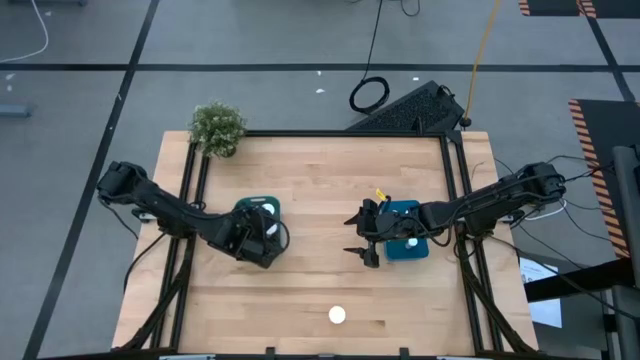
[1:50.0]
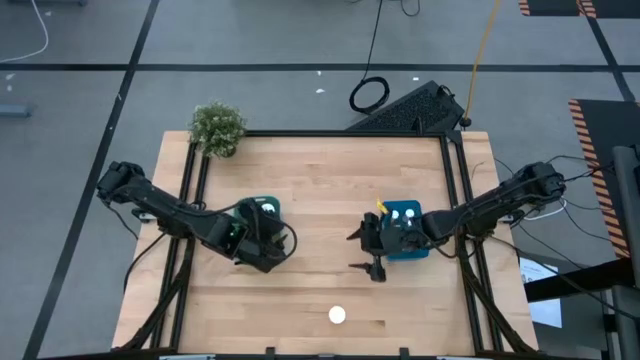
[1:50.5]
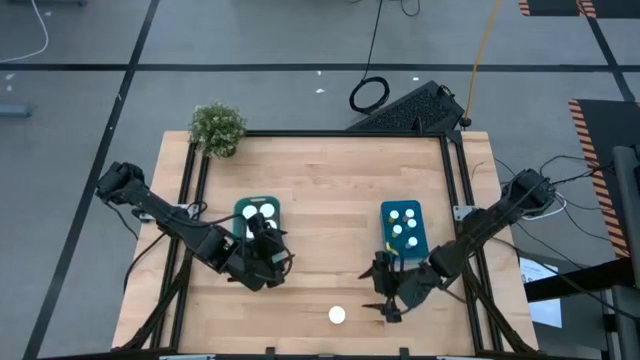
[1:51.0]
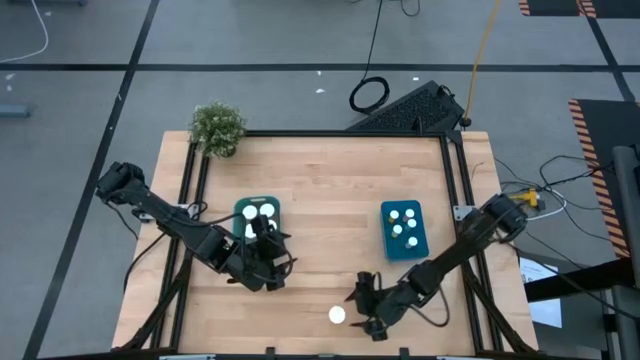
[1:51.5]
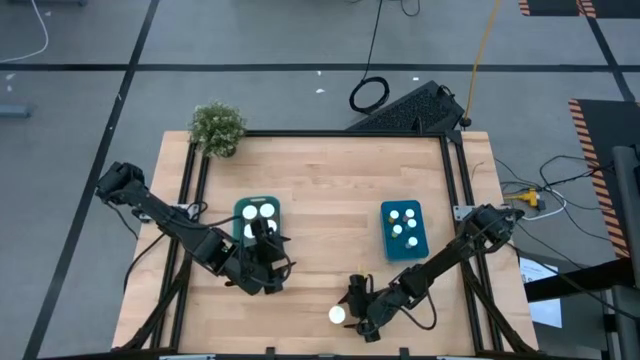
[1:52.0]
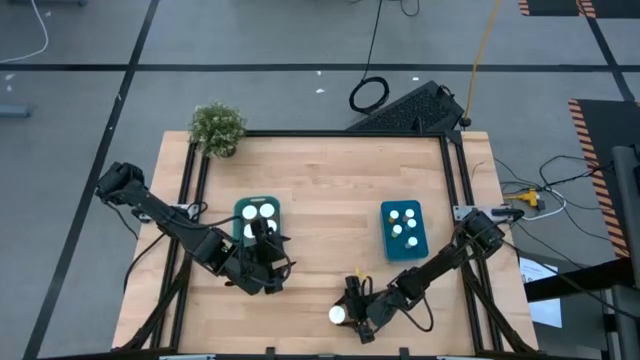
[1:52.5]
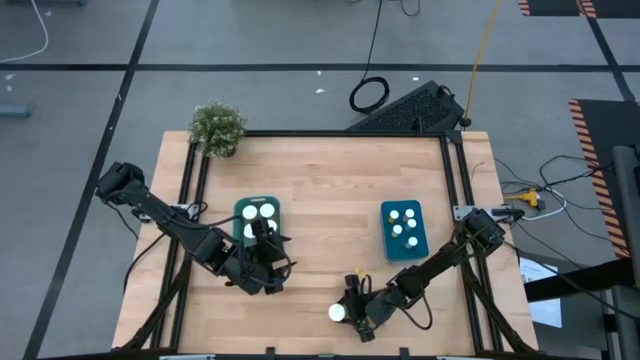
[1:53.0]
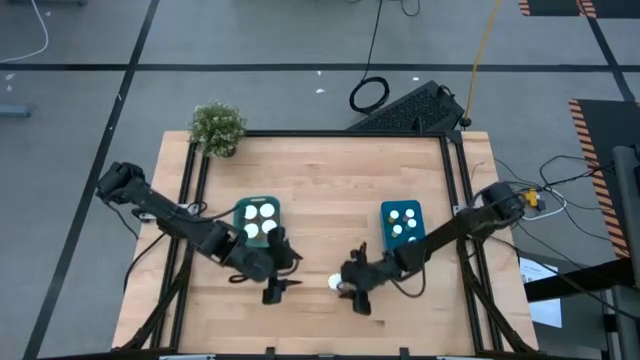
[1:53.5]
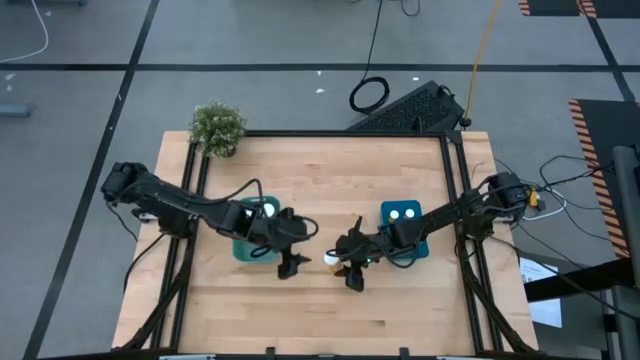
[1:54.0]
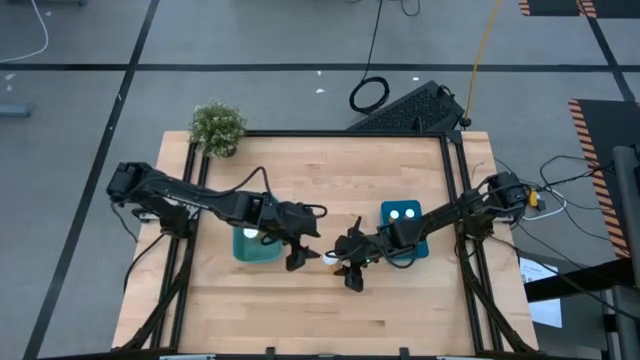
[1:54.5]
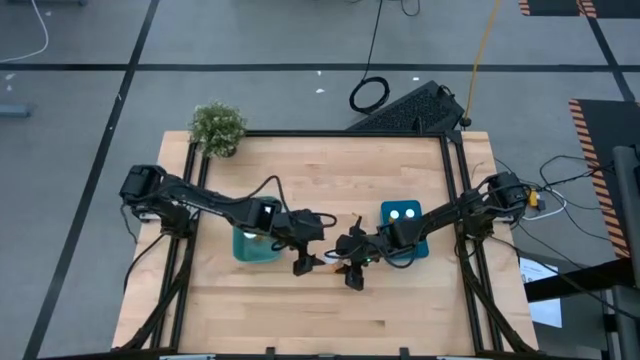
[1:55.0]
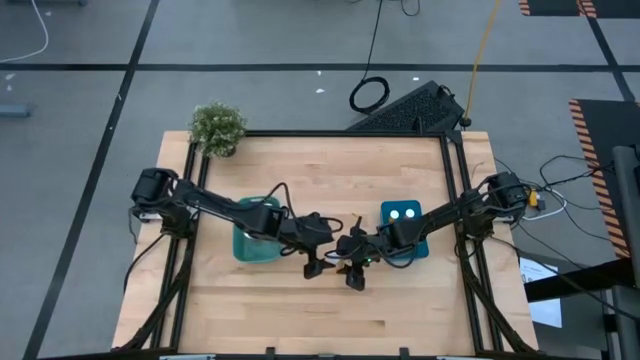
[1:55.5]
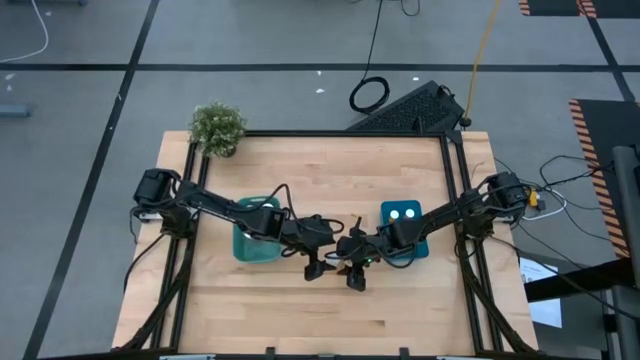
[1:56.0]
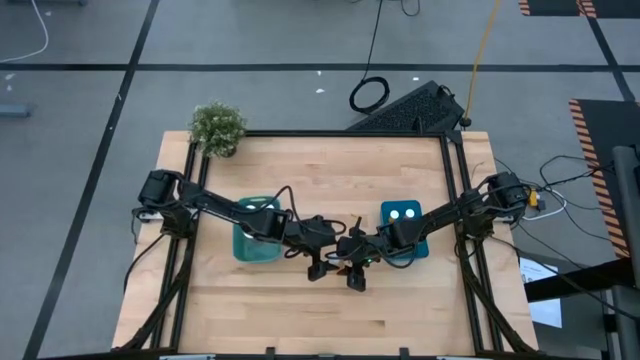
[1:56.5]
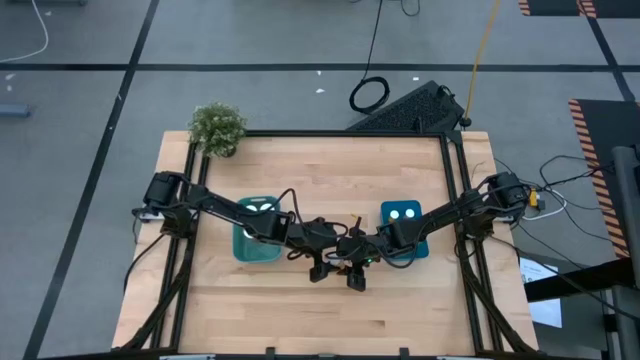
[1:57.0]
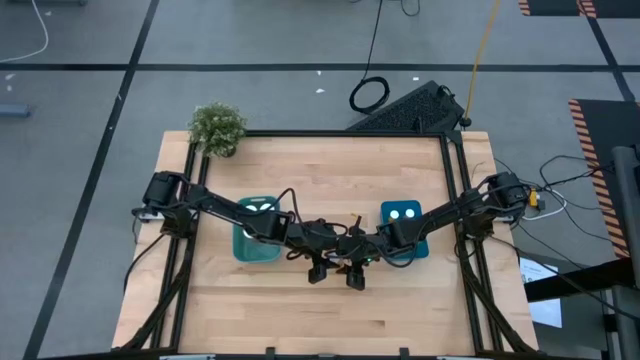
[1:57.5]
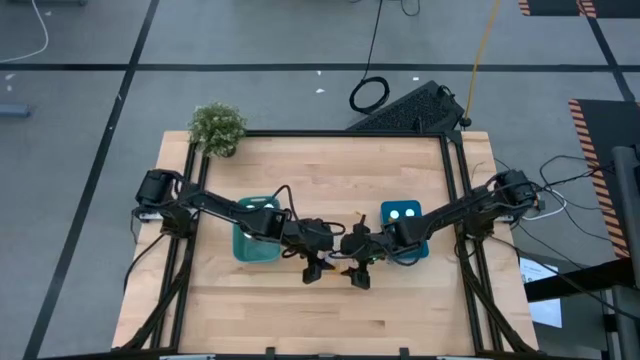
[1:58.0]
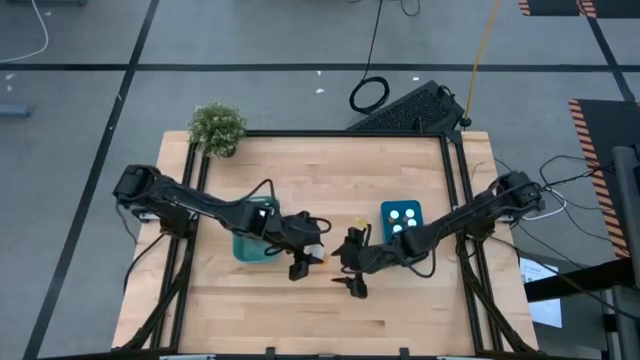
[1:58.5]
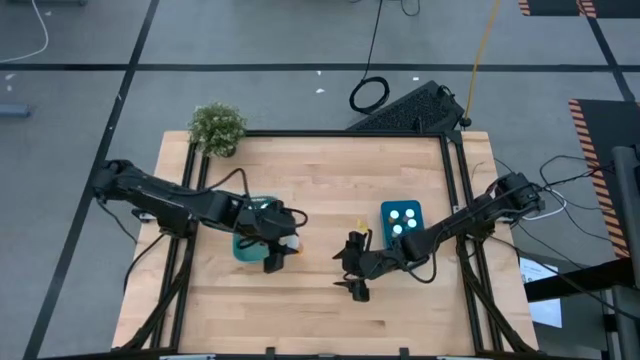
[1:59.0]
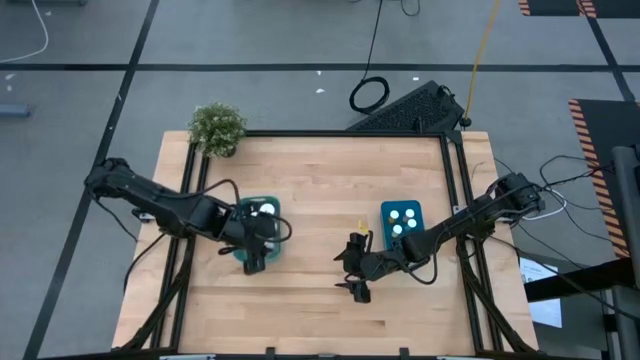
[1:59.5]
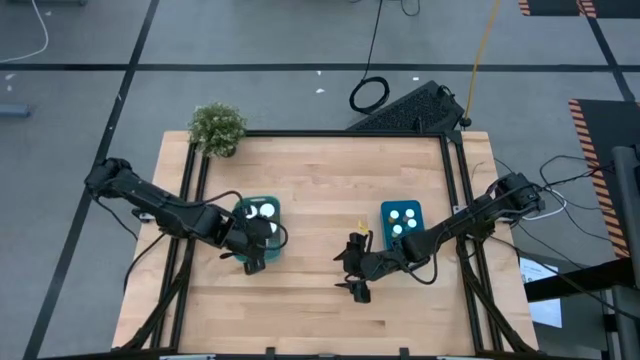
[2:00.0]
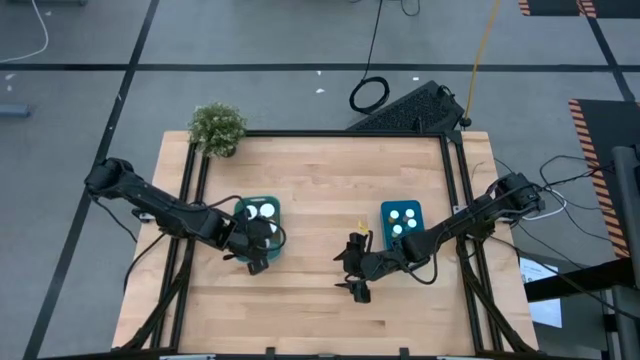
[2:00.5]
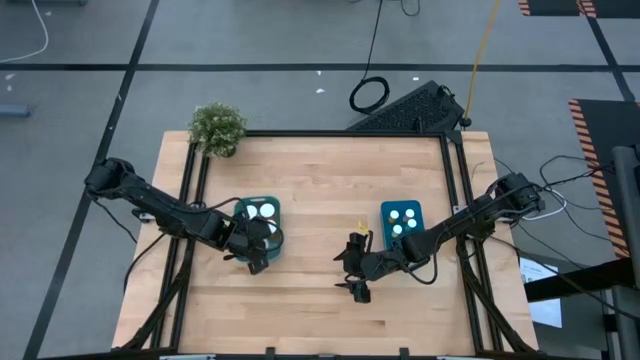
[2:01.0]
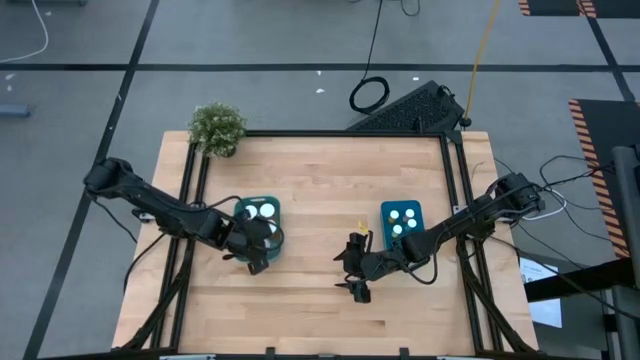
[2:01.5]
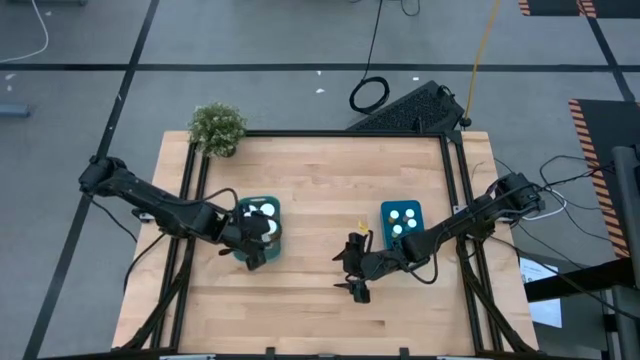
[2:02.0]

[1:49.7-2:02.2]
Task: Pick and place medicine bottles into bin by pill shape (circle, oval)
Put the big orange capsule bottle into the green bin

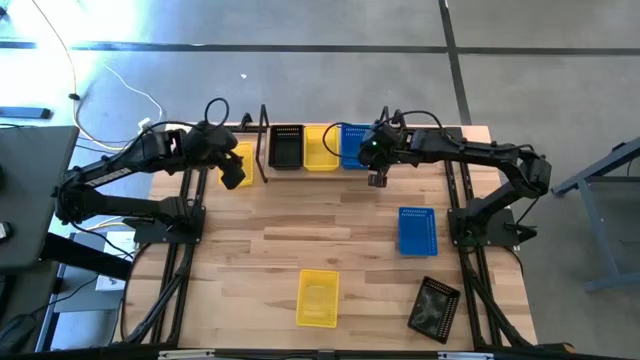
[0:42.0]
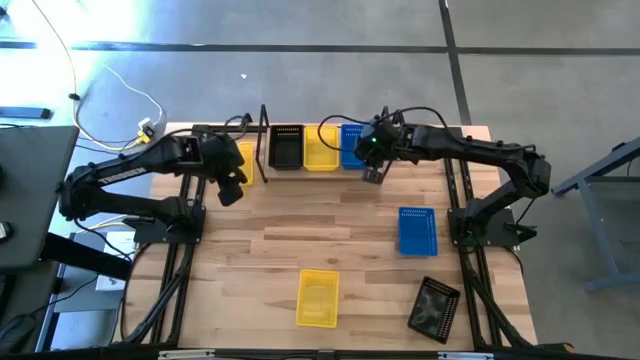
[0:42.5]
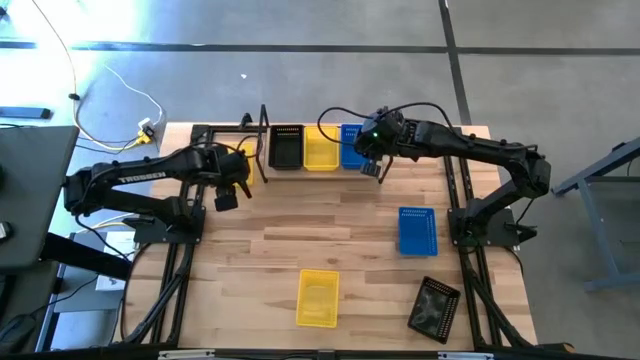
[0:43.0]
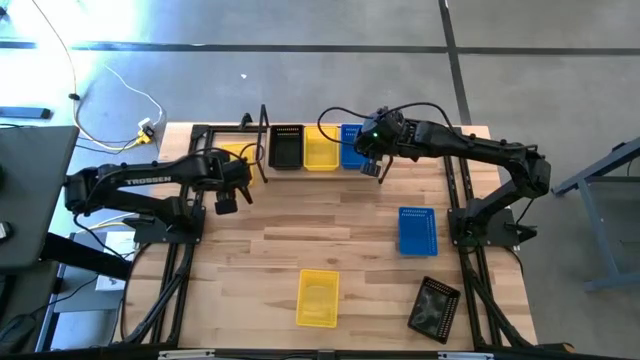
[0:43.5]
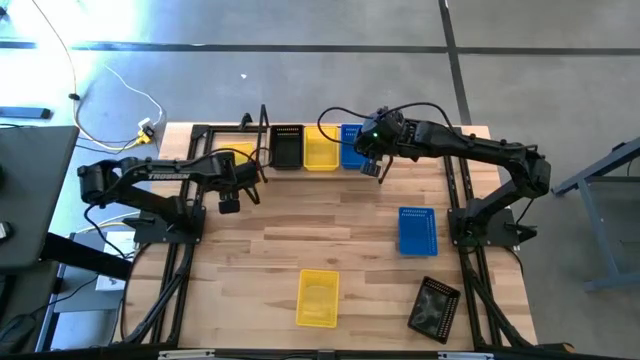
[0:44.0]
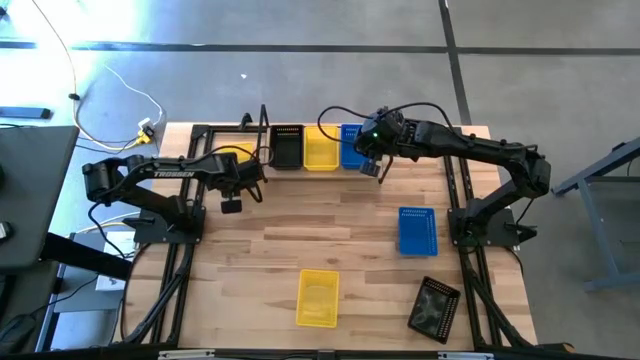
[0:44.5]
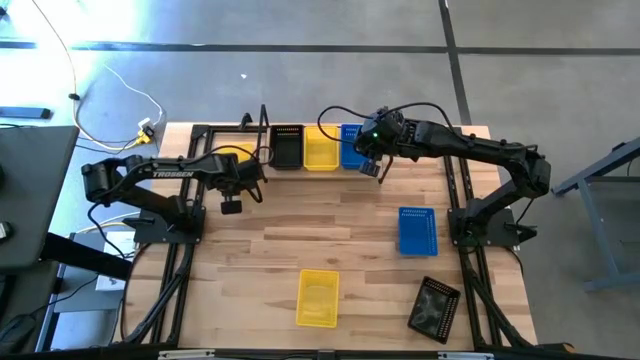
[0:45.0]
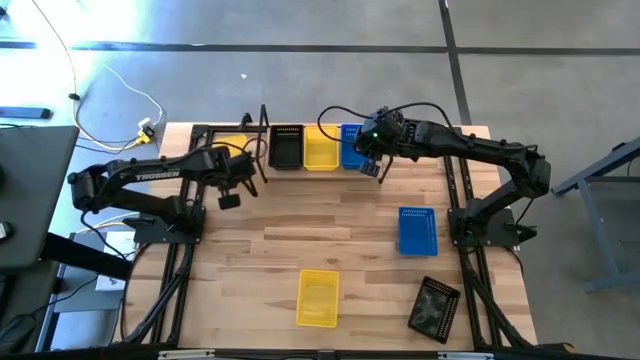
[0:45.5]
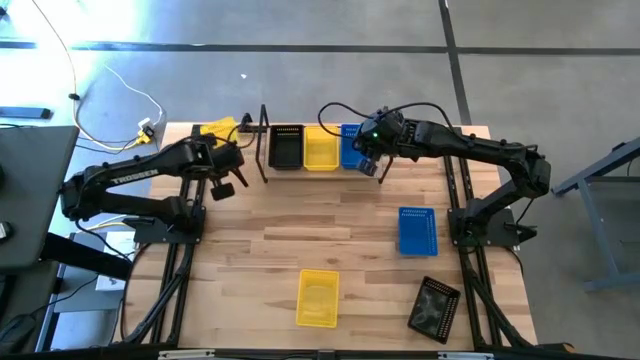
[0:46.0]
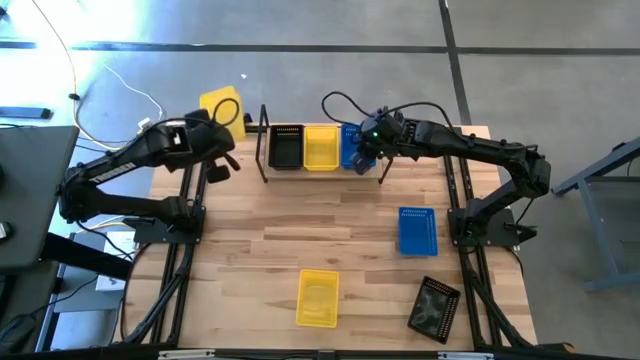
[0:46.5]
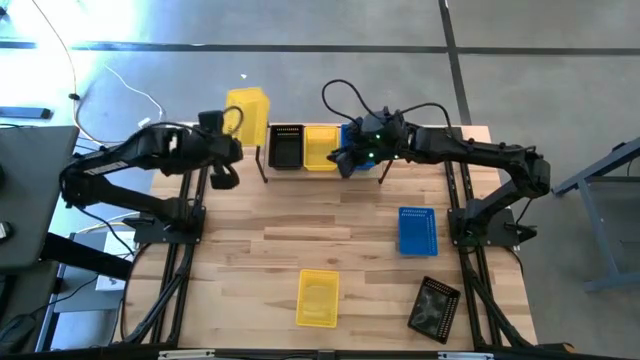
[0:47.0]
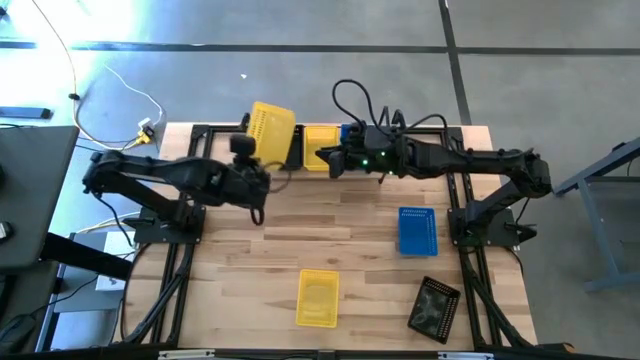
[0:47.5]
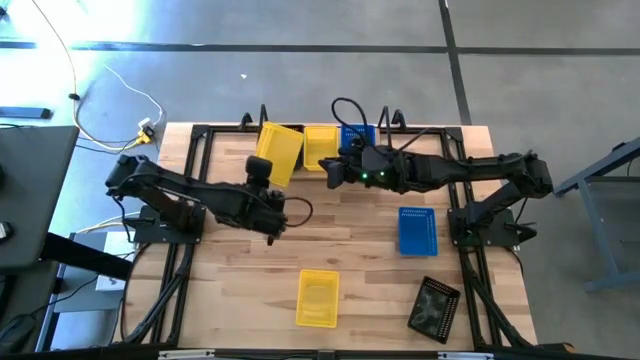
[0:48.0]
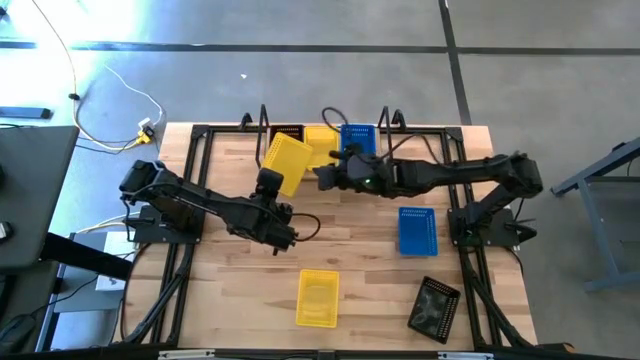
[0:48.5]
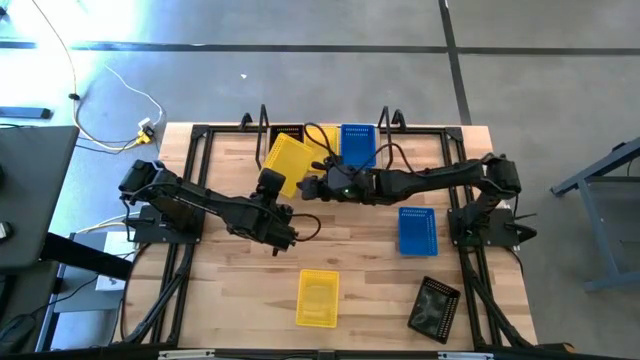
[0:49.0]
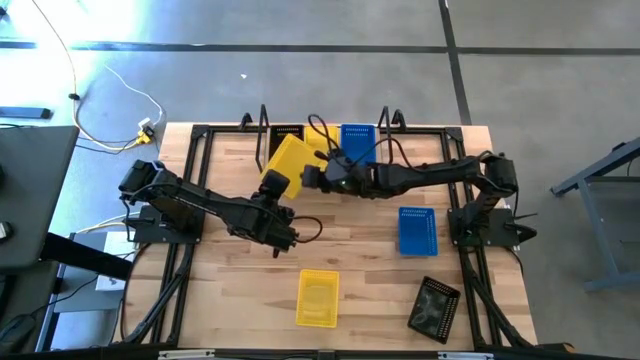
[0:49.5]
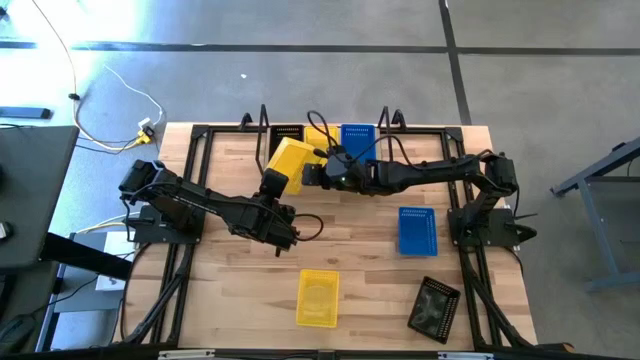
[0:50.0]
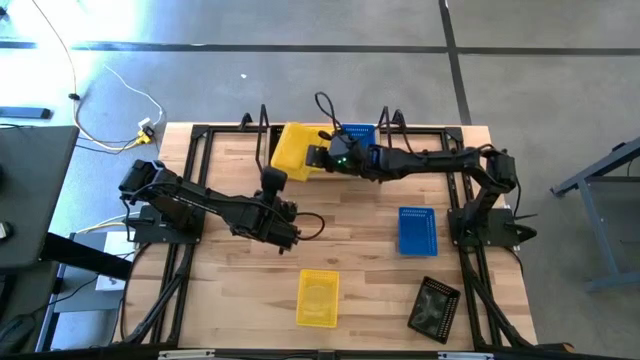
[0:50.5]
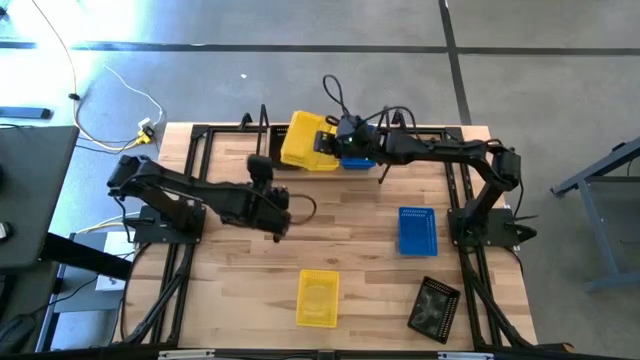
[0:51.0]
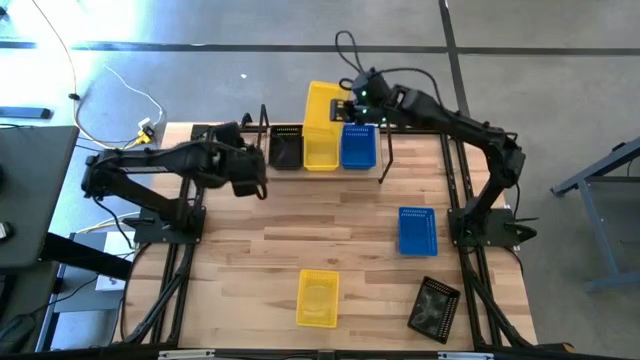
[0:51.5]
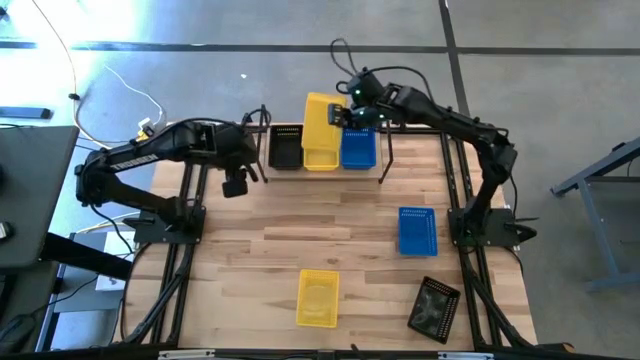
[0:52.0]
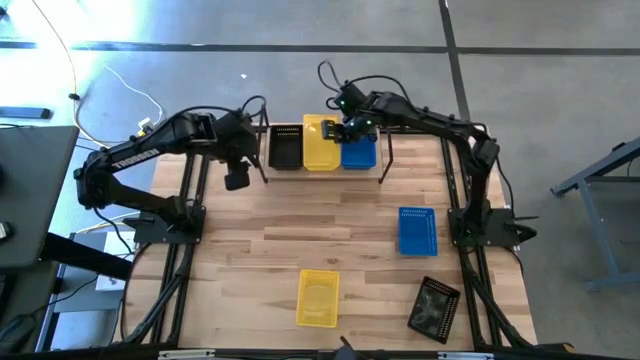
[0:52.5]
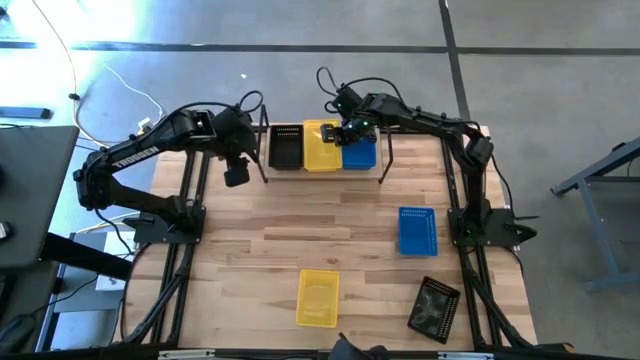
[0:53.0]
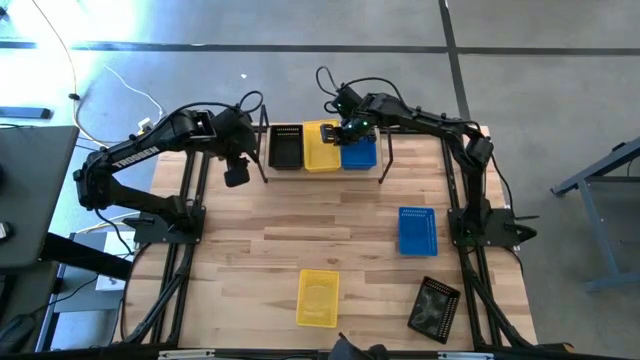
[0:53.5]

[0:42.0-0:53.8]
Task: Stack baskets on shelf by color
Stack the top yellow bin on top of the yellow bin on the shelf
